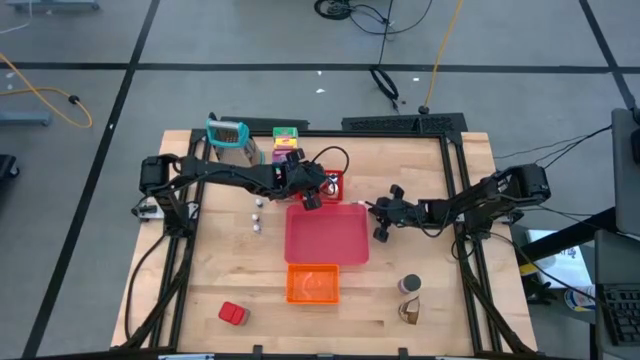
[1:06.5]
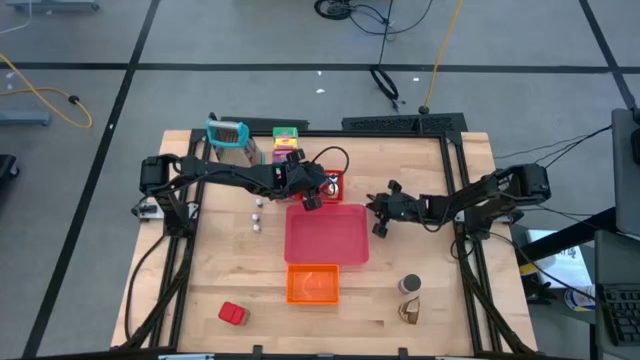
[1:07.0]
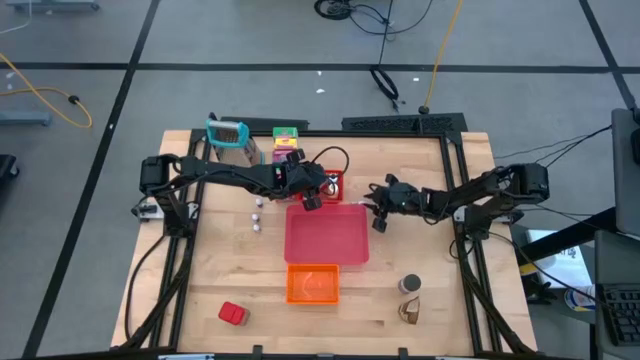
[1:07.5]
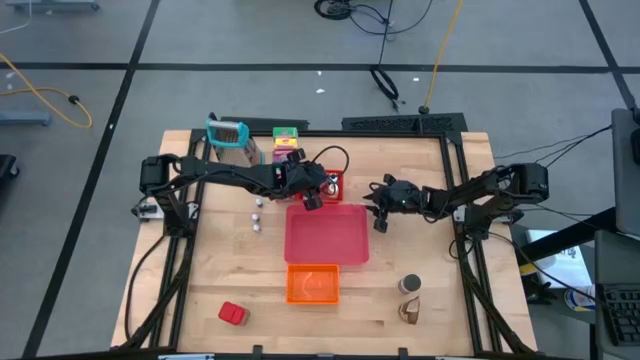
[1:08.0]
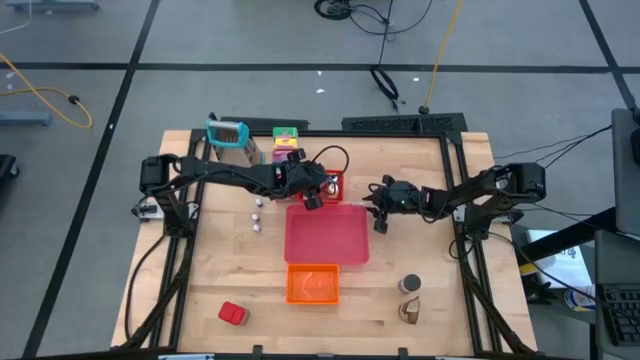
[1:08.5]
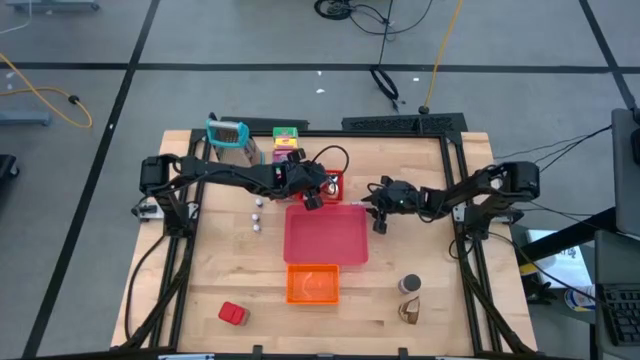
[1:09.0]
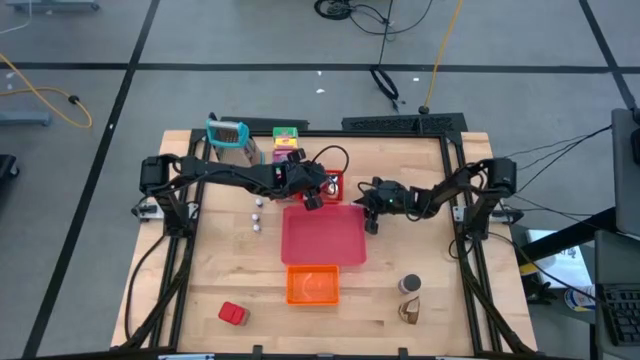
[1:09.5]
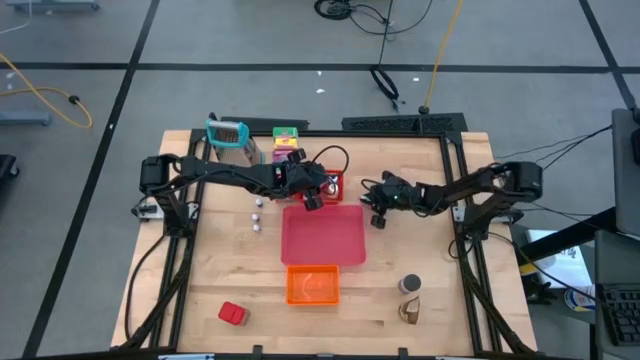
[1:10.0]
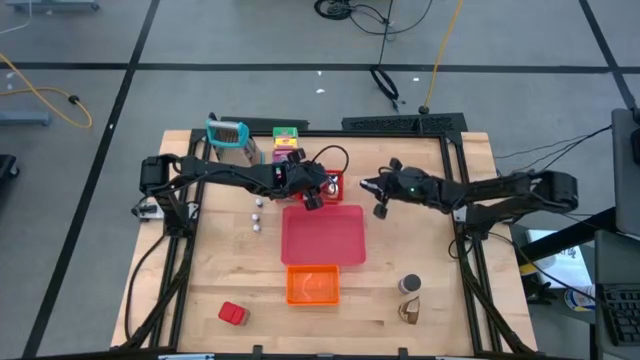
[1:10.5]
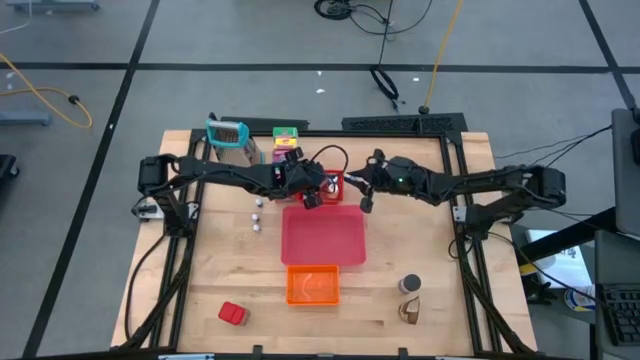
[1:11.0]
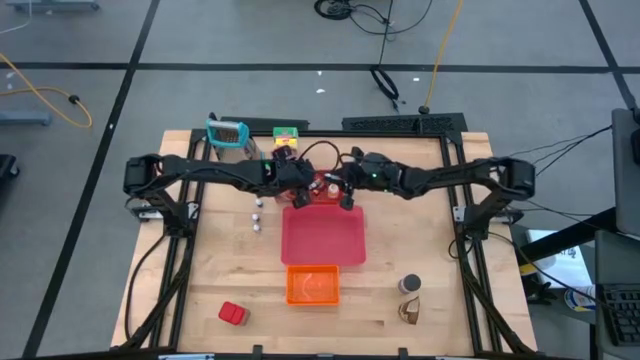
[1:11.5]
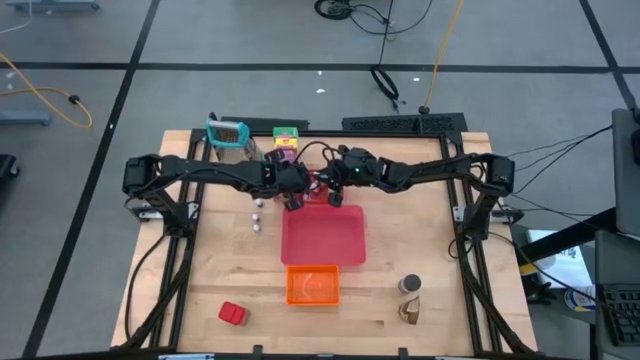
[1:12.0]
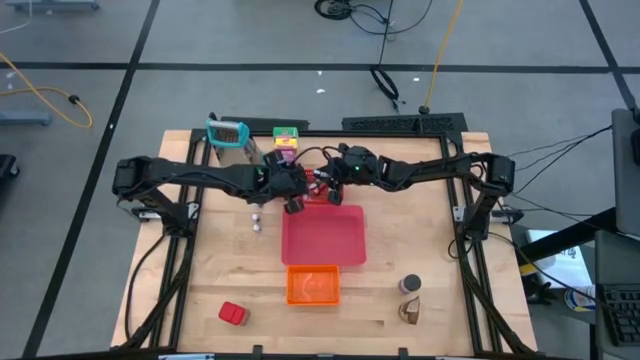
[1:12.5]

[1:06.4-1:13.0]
Task: Pick & Place Kitchen Items
Put the brown food coloring bottle into the red bin

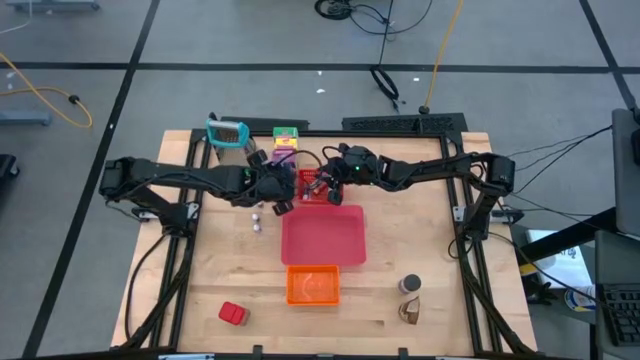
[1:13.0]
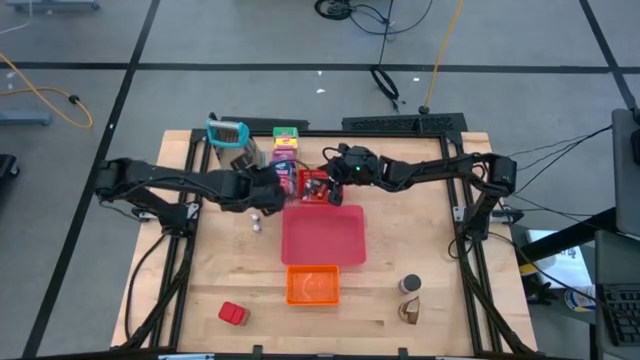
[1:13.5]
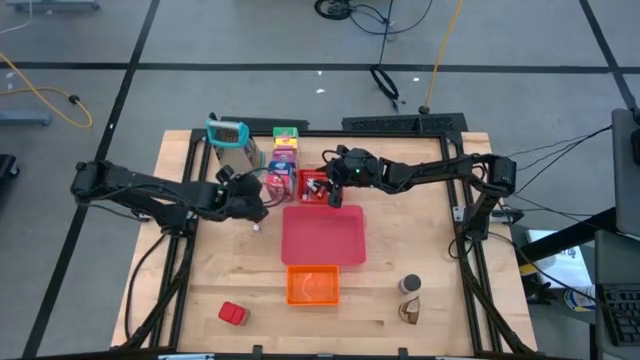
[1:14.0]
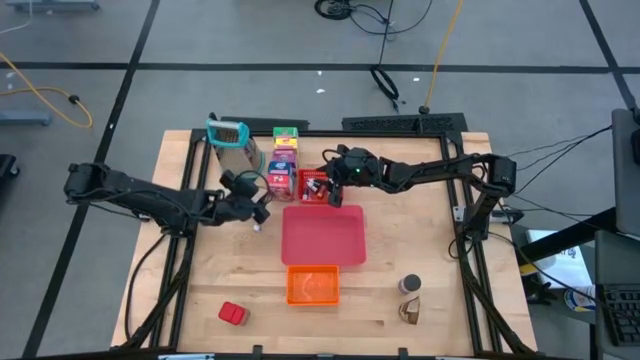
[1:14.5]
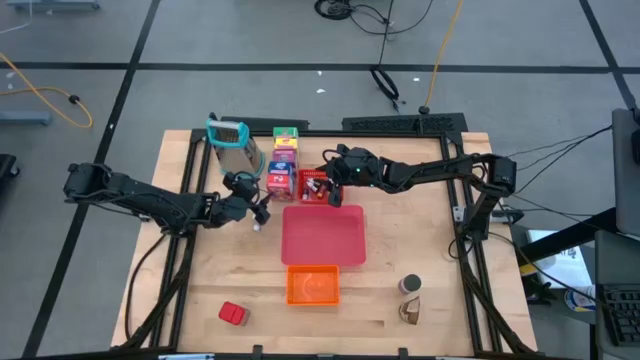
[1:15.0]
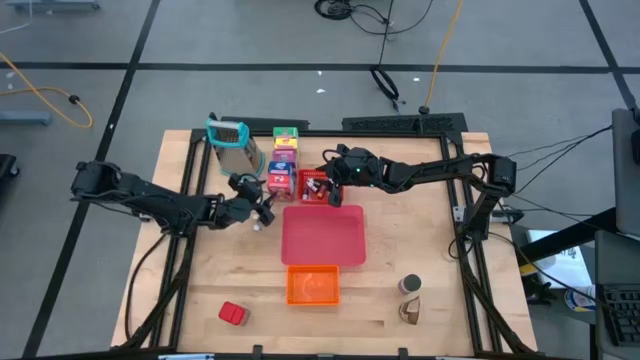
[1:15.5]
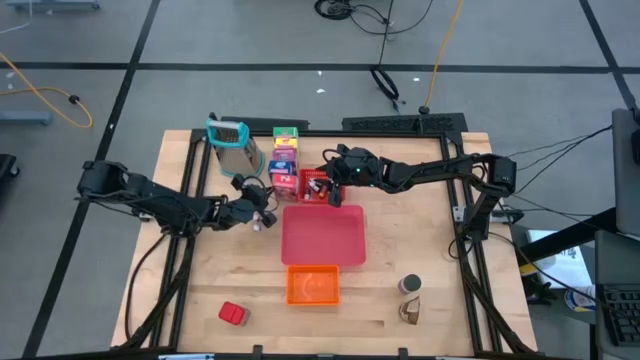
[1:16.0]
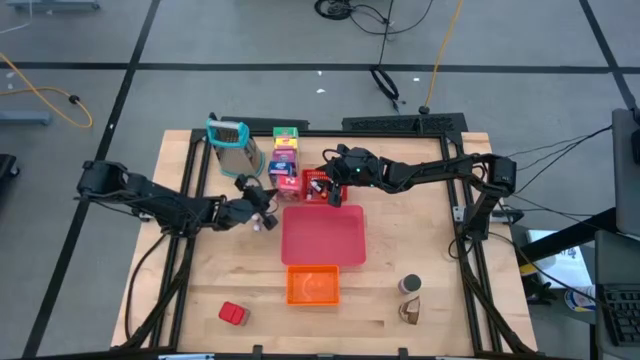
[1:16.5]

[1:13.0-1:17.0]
Put the red cereal box into the pink bin

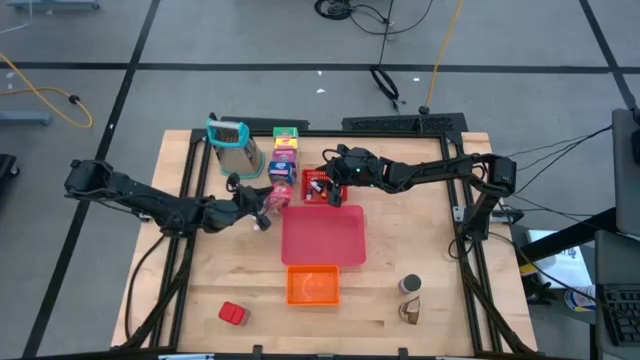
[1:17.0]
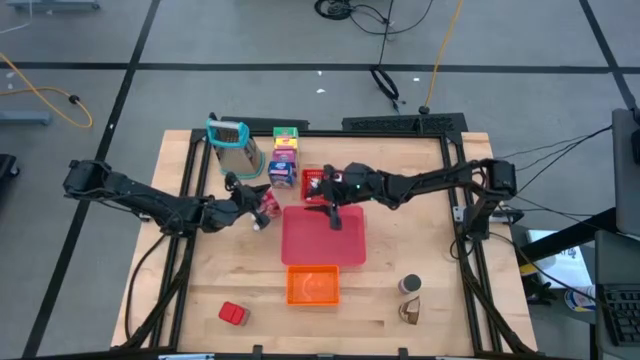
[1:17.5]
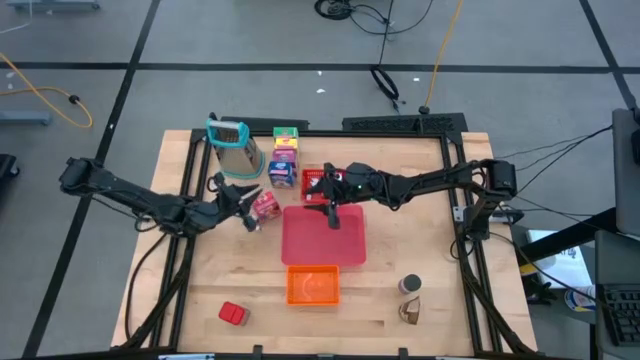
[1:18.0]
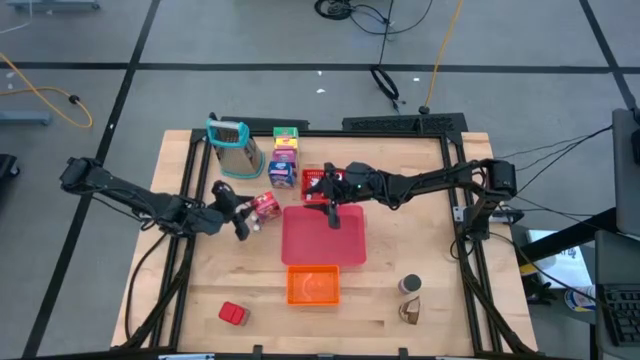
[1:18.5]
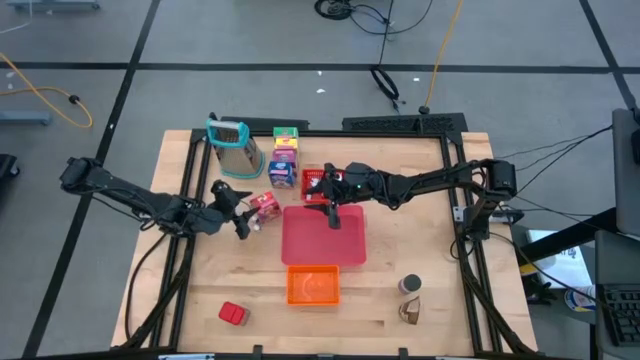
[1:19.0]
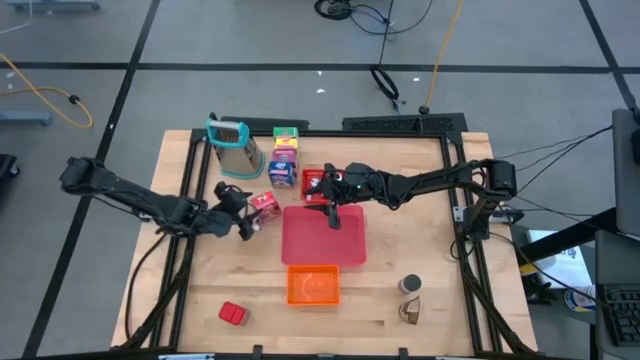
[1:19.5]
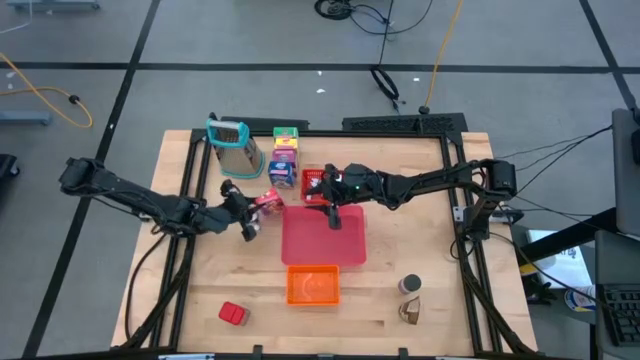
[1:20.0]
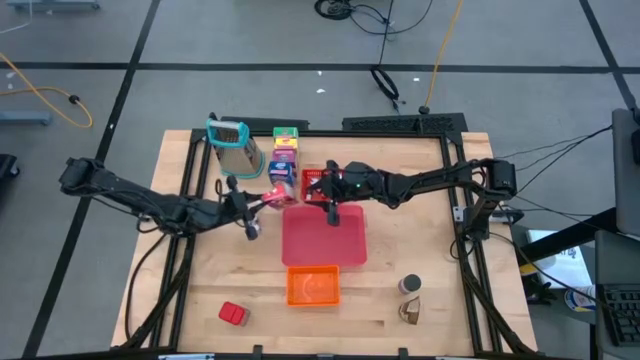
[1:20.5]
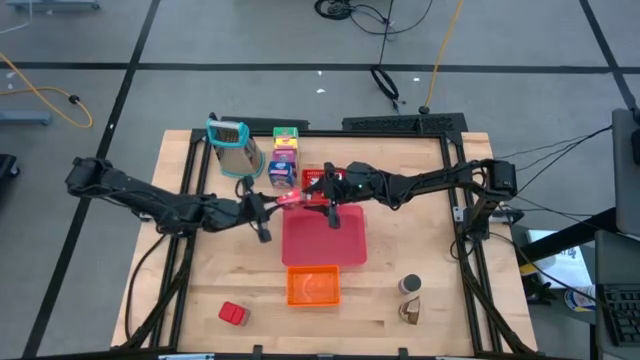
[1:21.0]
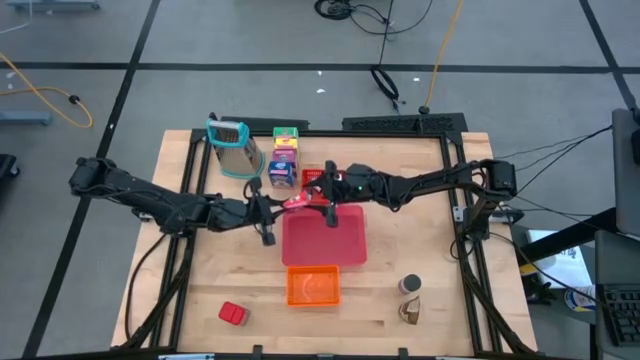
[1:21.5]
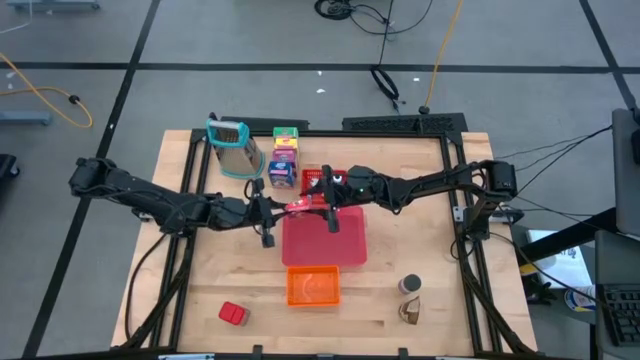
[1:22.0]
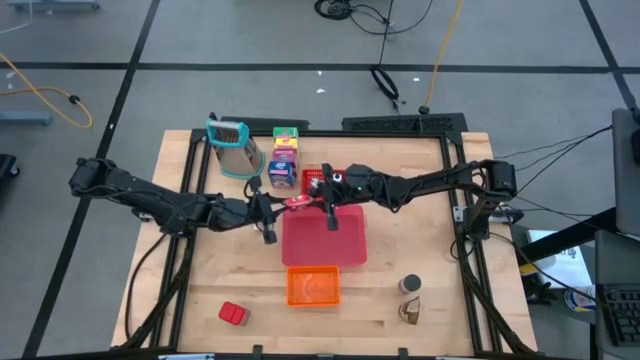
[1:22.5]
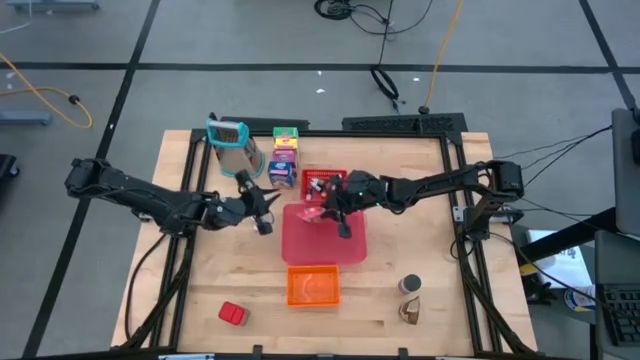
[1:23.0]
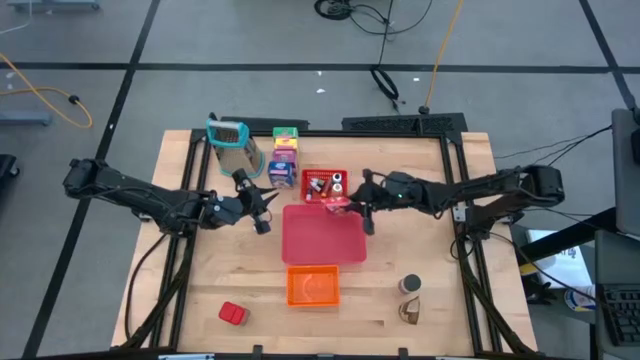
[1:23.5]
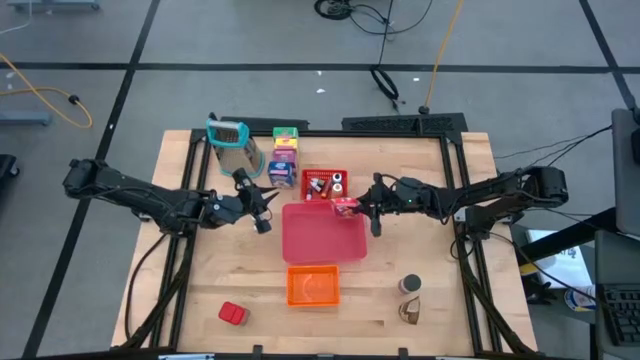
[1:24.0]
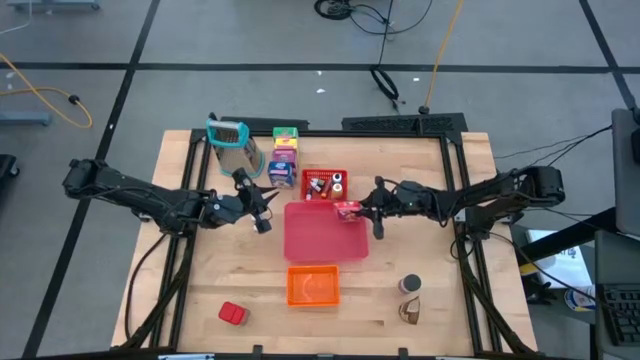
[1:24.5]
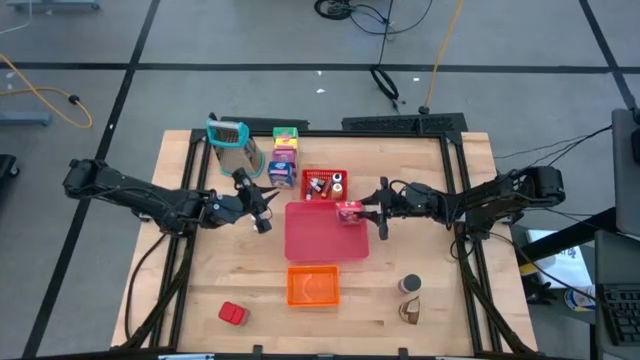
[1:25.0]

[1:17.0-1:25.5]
Put the red cereal box into the pink bin

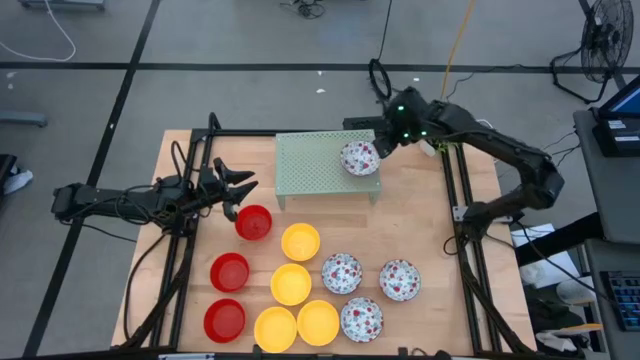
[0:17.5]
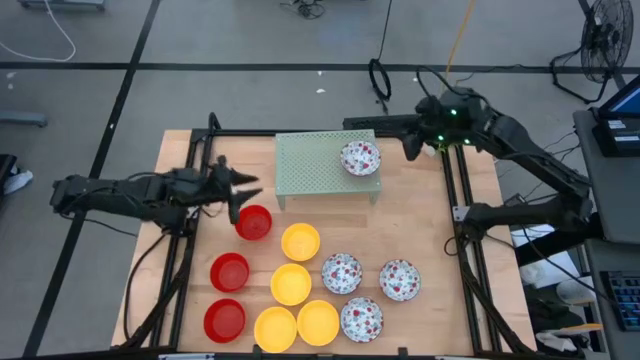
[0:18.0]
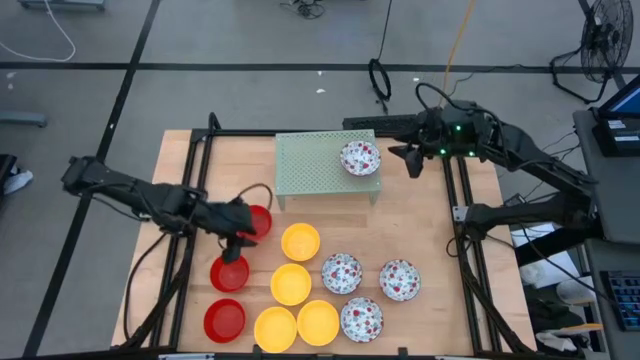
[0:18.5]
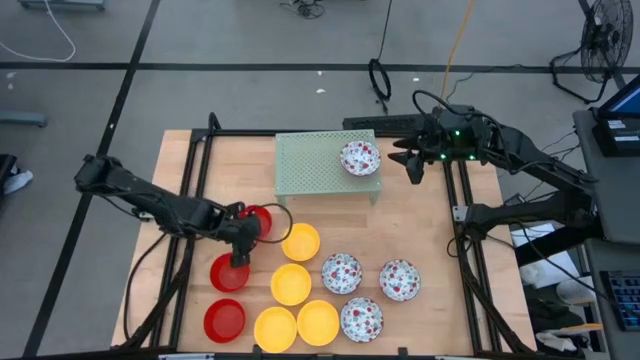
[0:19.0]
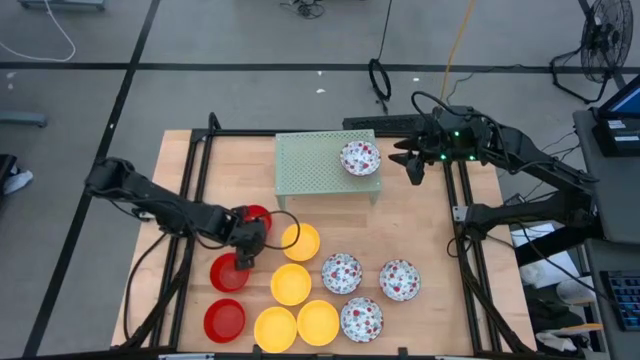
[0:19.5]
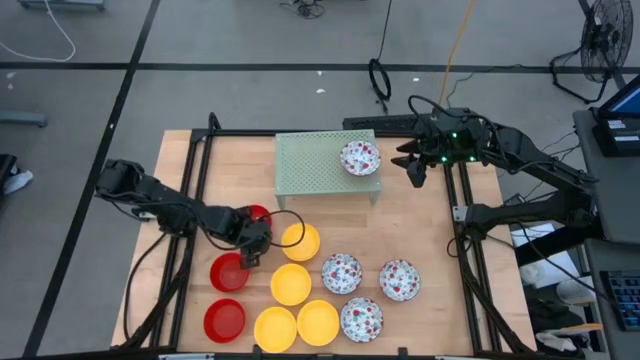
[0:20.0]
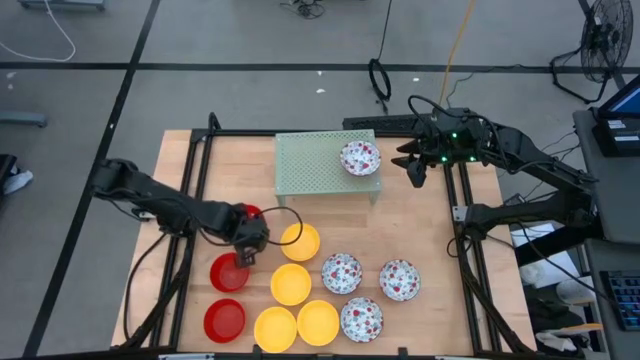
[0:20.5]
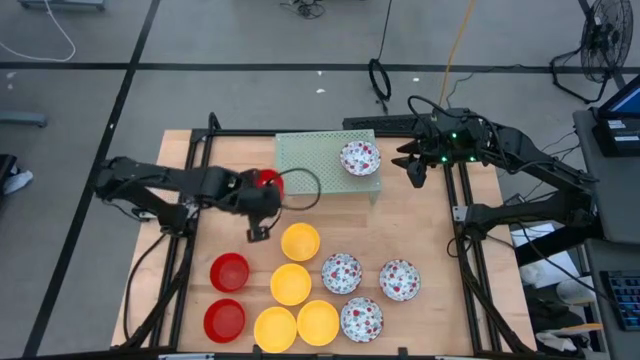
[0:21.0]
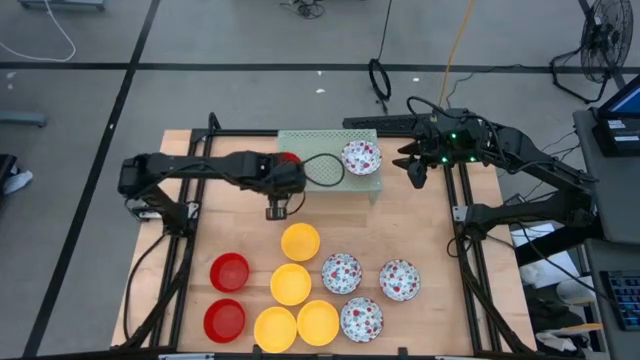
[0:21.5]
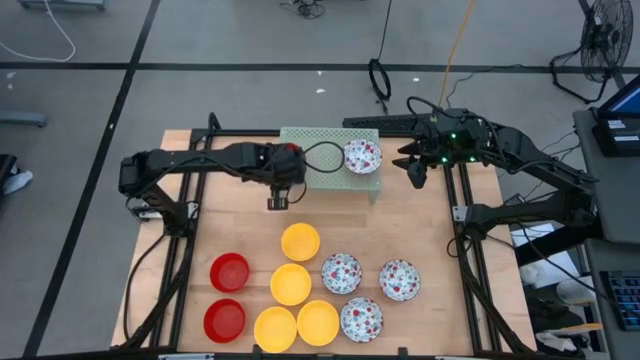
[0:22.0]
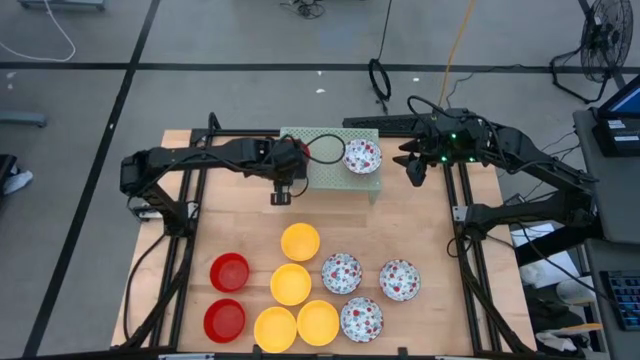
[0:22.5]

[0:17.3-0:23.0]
Task: Pick & Place Mini bowls
Put the red bowl on the shelf
